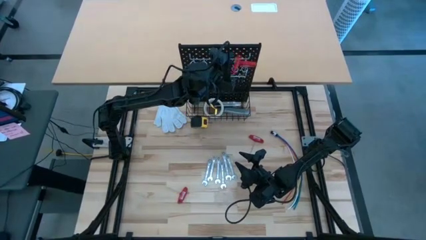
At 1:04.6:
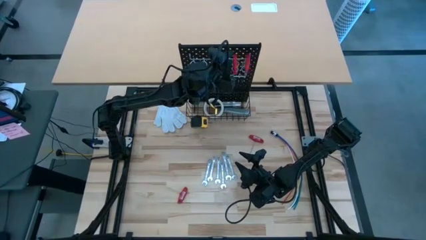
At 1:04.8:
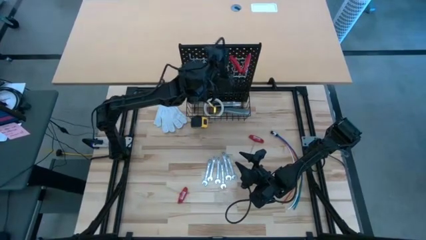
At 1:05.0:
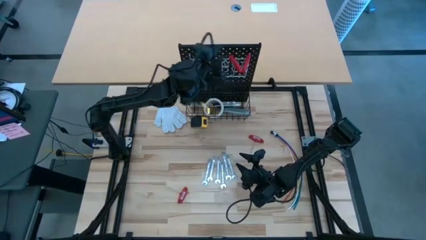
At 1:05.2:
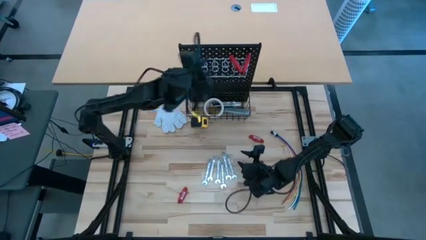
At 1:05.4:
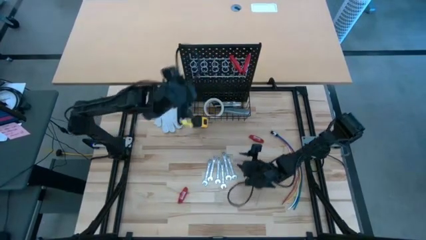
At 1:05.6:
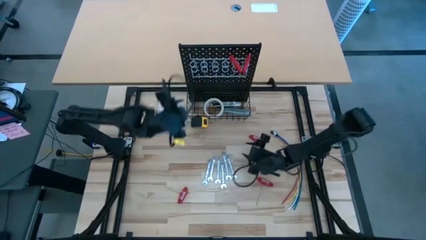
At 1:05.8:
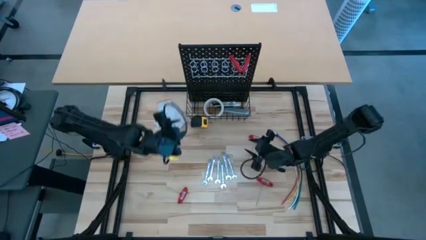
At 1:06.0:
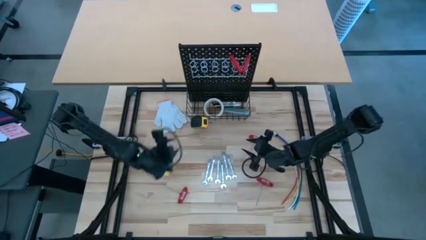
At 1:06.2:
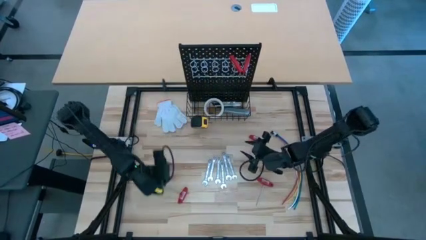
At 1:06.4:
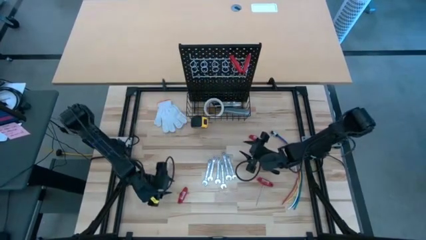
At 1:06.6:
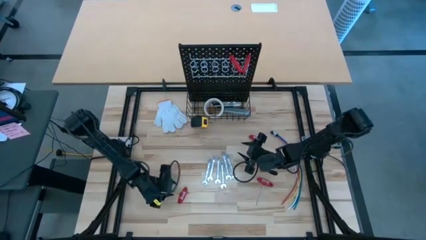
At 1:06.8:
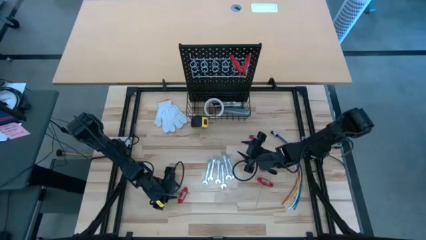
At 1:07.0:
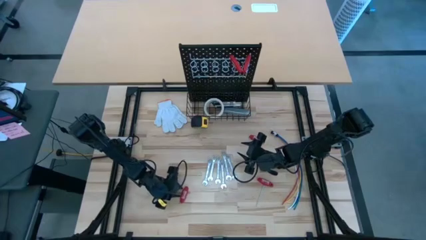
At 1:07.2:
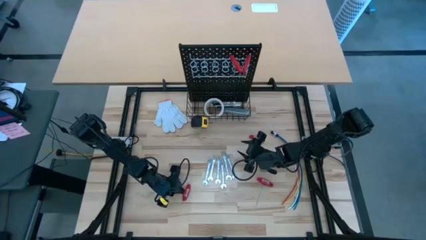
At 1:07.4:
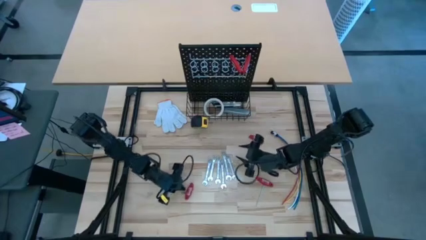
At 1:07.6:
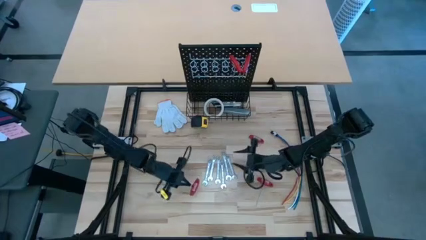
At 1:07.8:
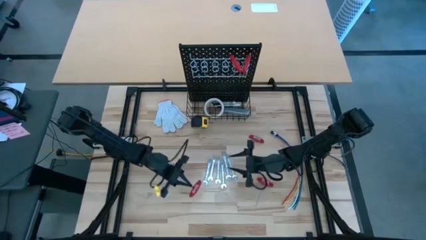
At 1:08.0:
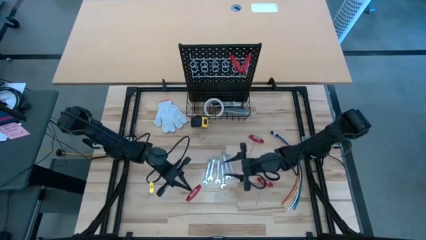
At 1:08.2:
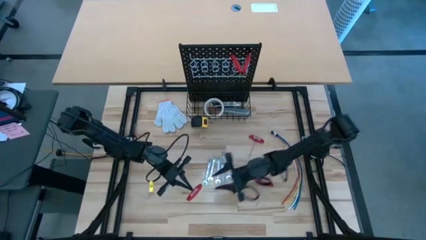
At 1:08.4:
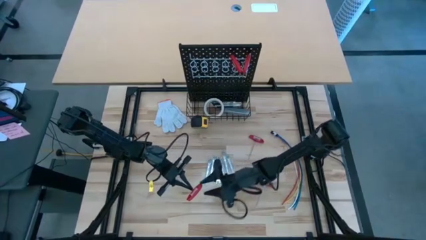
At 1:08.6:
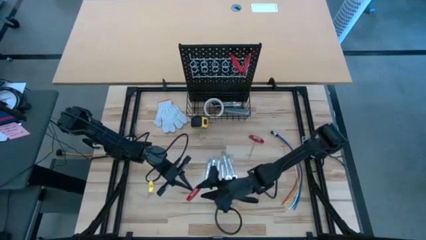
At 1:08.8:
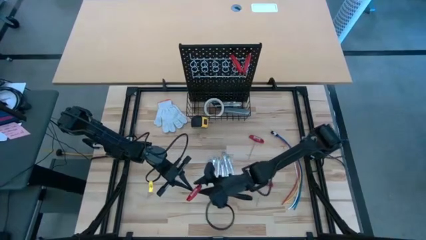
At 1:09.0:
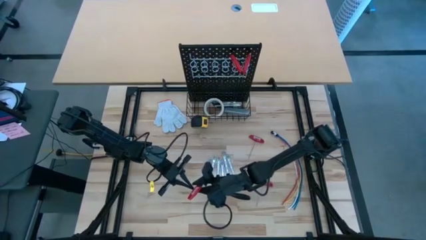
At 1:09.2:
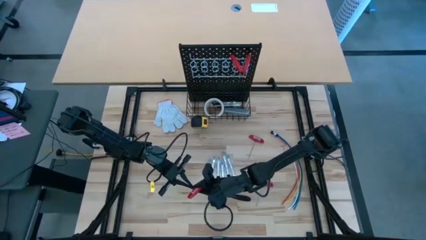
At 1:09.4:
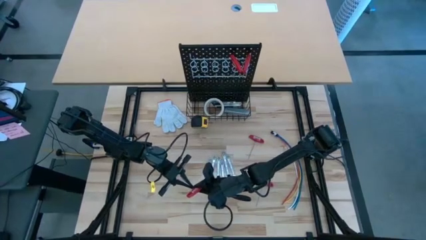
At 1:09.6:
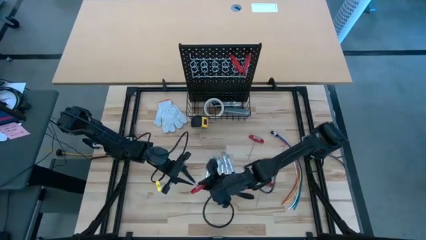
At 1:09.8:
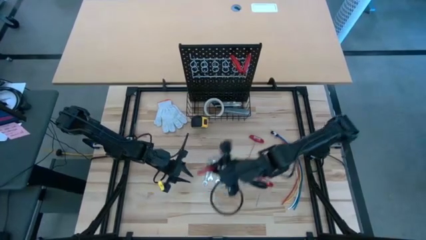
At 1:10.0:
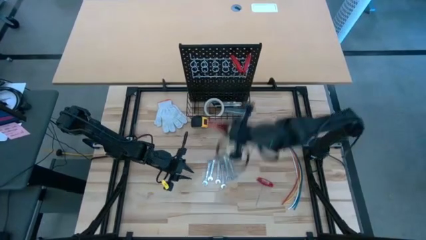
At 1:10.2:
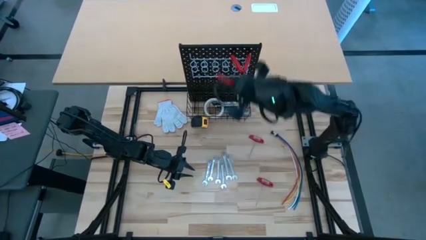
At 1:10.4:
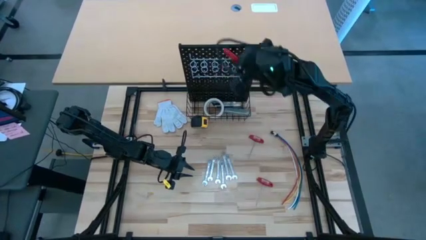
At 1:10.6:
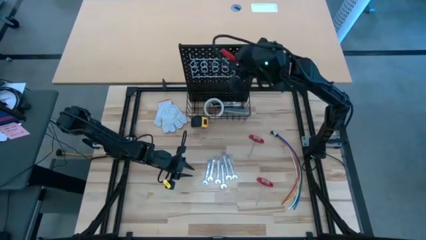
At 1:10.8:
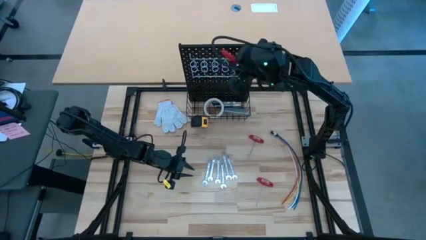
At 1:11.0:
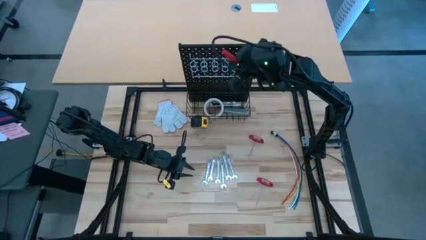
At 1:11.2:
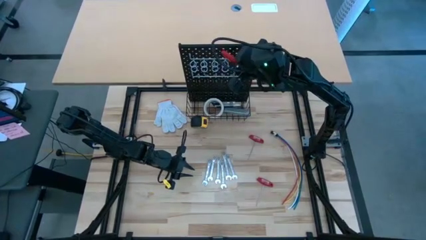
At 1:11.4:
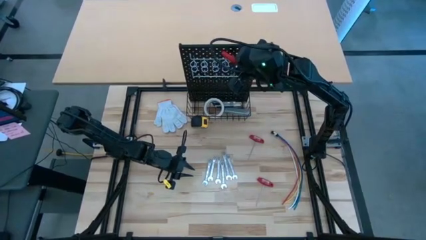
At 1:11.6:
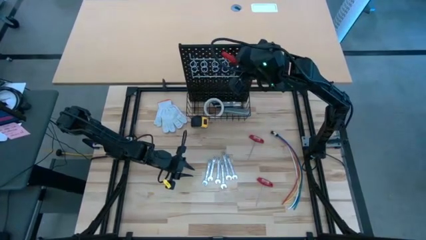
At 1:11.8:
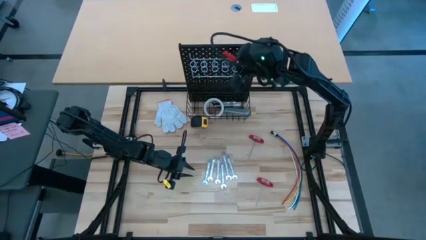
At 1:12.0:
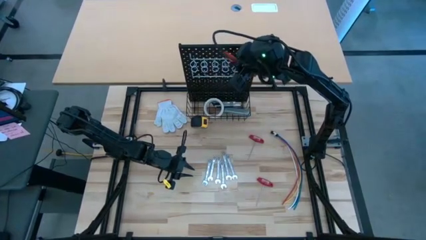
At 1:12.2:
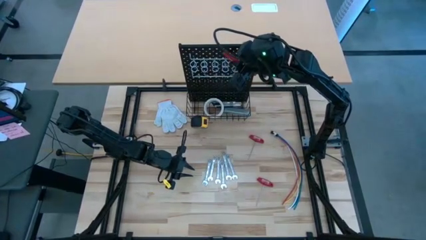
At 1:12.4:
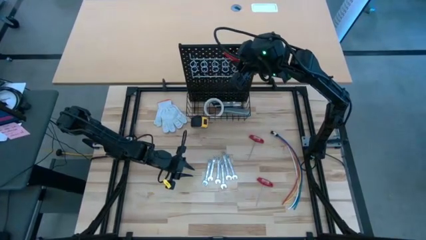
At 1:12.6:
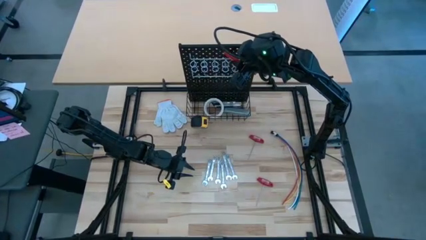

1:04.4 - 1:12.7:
Task: Hang tools onto peg board
Hang the red Allen wrench on the pegboard

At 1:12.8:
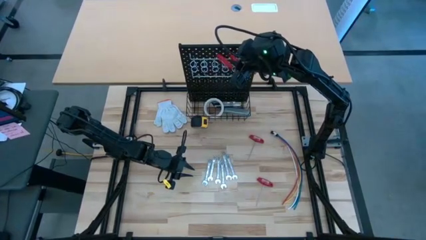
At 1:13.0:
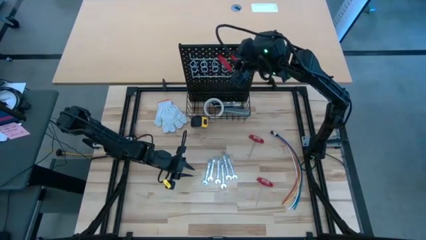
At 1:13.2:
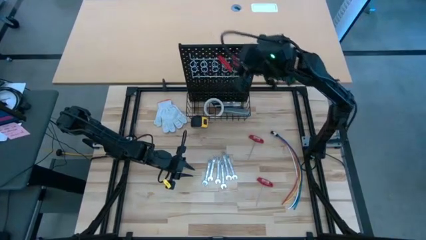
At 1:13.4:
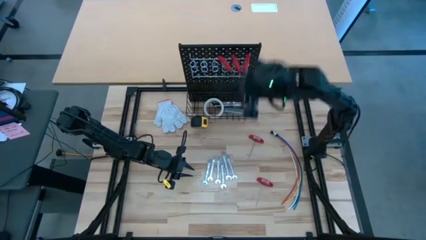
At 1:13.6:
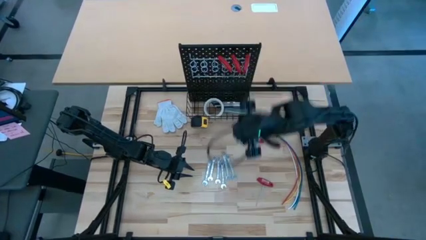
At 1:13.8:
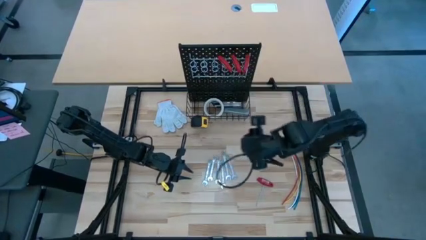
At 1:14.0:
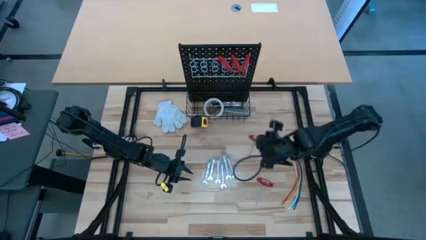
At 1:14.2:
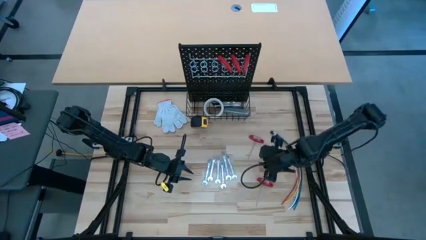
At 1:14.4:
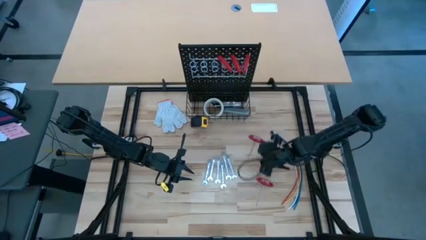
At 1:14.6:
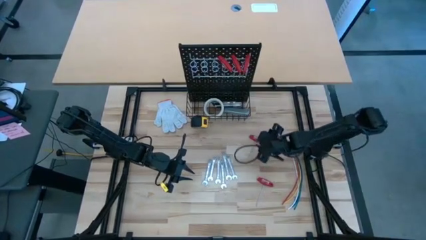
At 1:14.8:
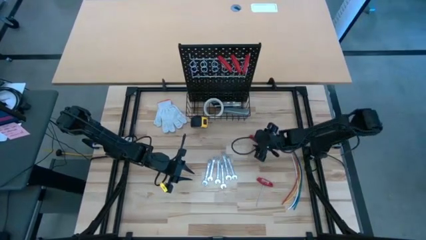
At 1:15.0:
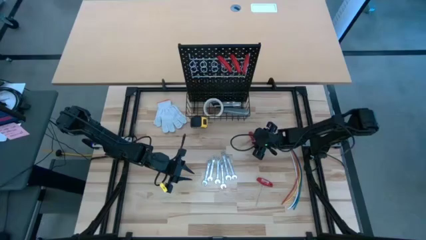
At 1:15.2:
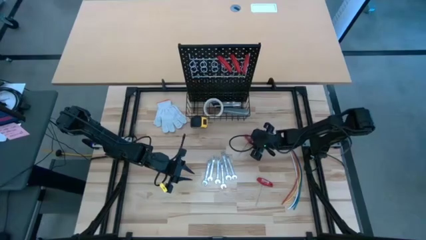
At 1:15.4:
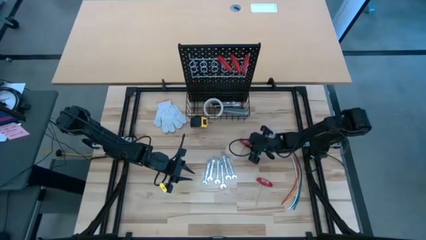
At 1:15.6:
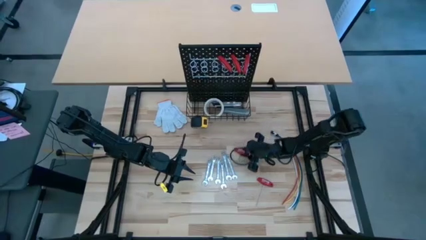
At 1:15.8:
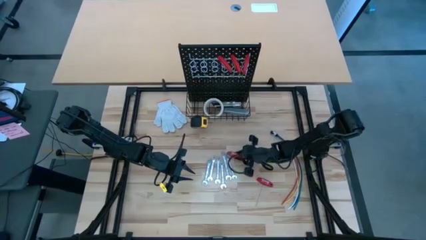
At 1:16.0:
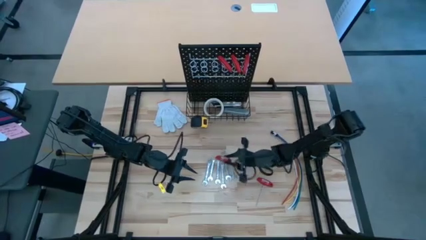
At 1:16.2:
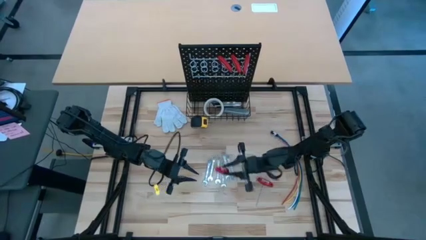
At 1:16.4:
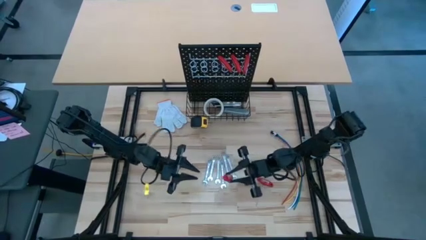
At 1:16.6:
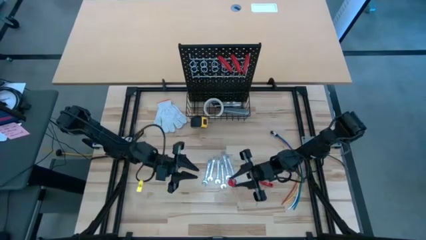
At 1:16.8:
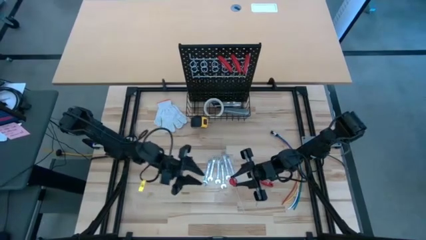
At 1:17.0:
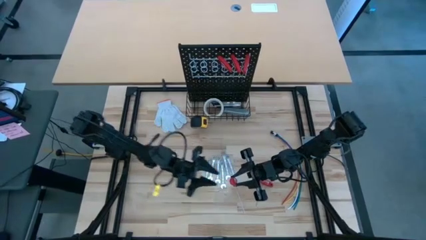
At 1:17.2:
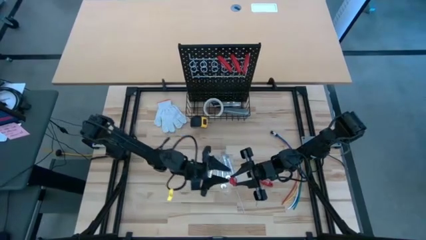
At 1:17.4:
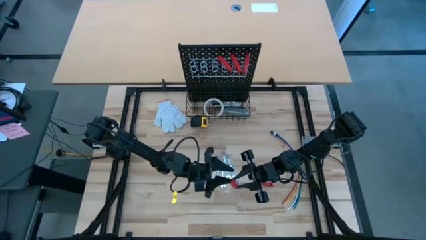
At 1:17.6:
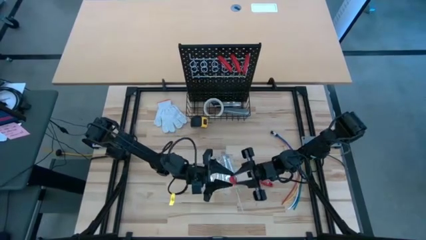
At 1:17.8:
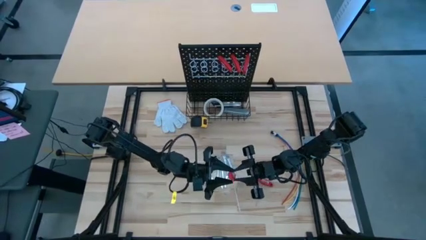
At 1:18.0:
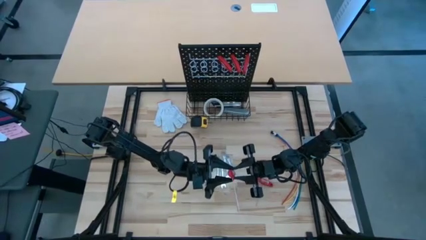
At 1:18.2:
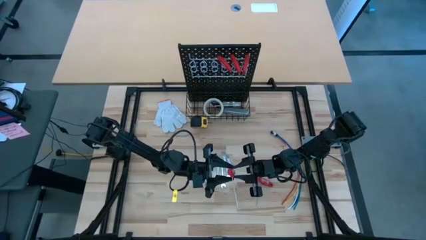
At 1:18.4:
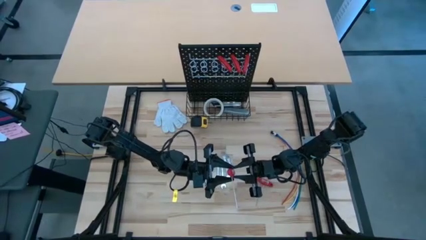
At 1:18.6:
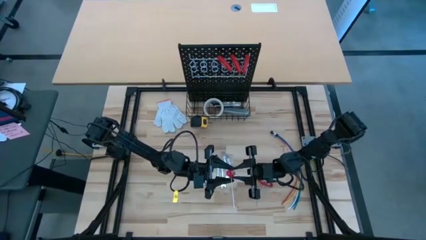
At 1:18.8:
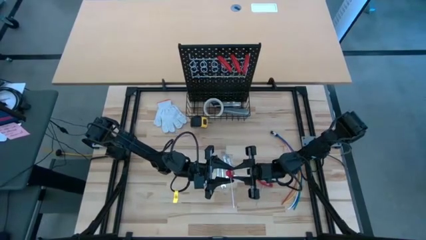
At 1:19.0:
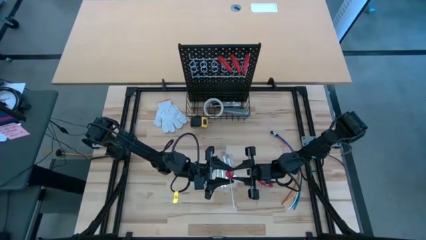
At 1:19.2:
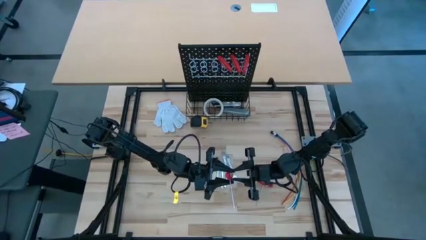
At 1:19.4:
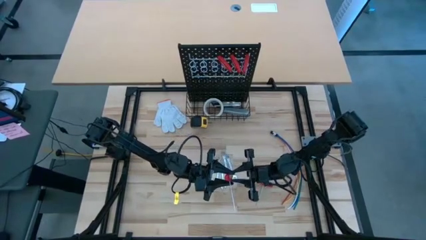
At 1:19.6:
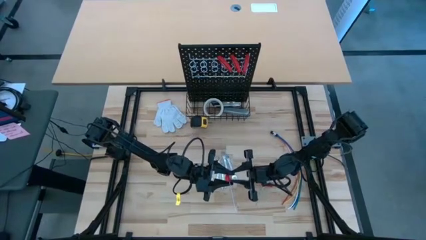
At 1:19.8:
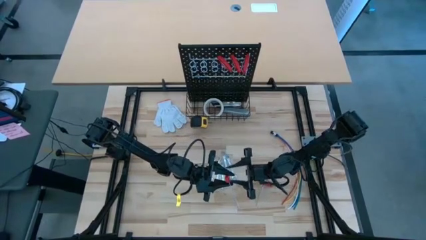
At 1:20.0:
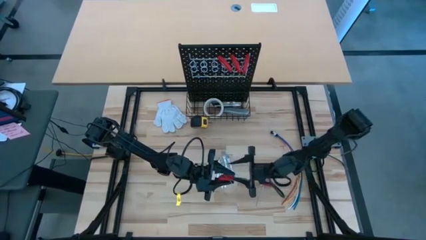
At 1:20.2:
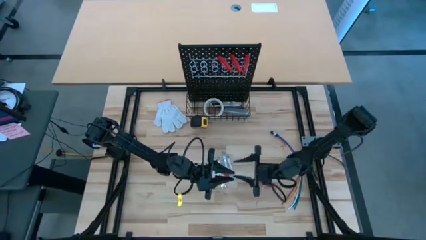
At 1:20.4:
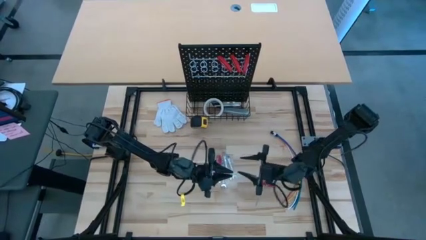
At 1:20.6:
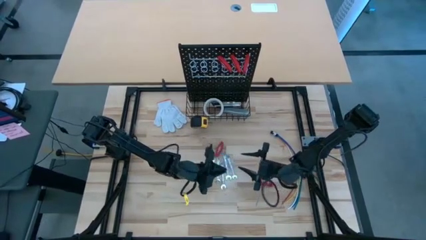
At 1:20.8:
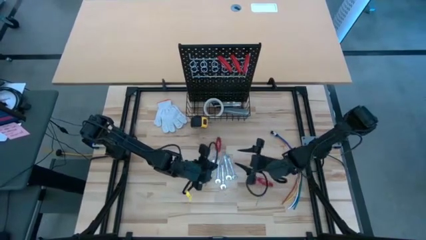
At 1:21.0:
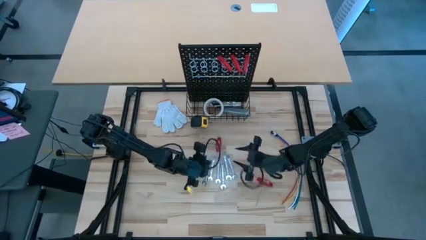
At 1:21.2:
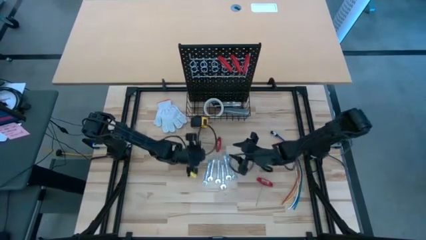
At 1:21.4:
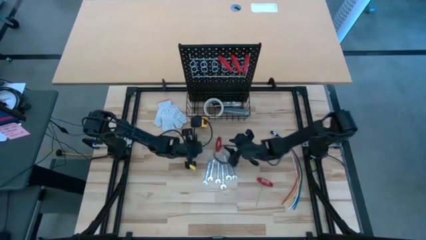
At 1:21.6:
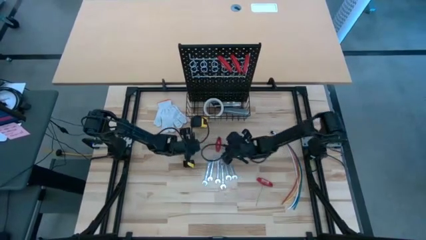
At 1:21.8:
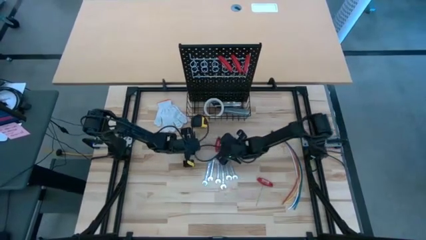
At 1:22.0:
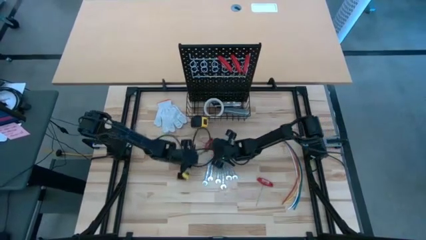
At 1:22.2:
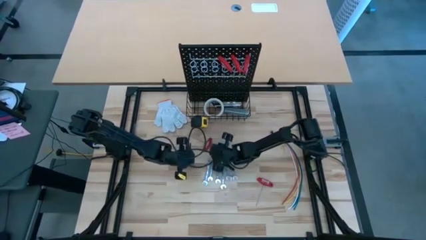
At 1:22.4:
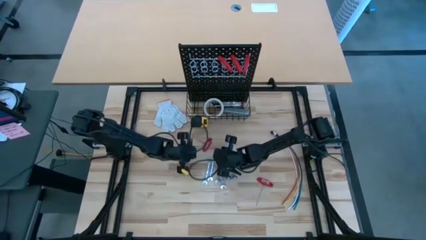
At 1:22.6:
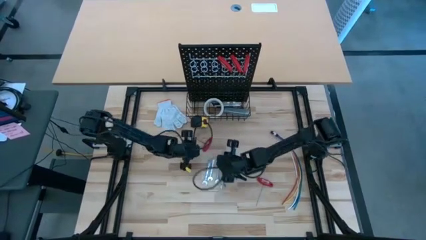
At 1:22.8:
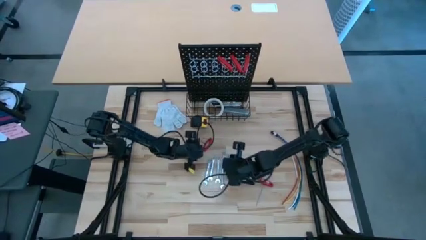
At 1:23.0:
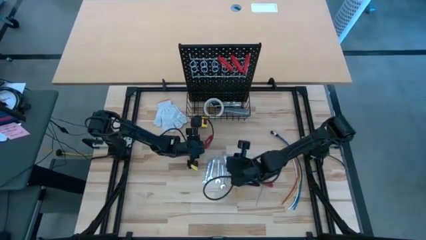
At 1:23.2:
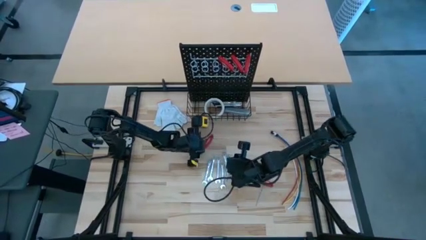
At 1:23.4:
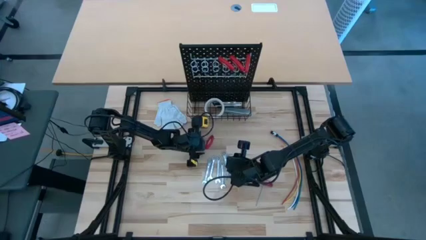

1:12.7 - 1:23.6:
Hang the red Allen wrench on the pegboard
